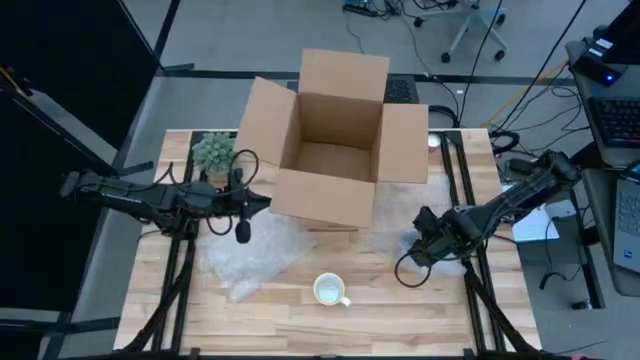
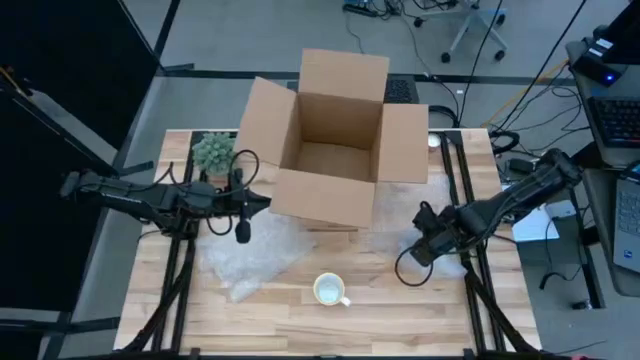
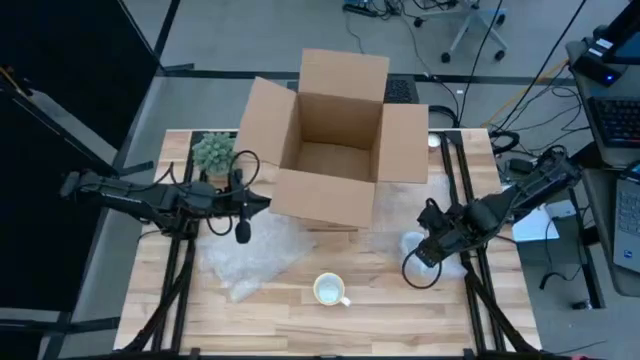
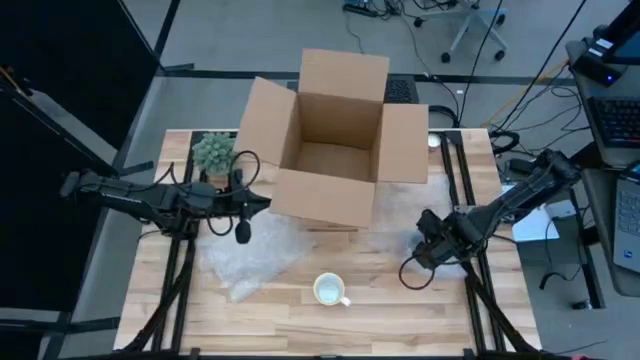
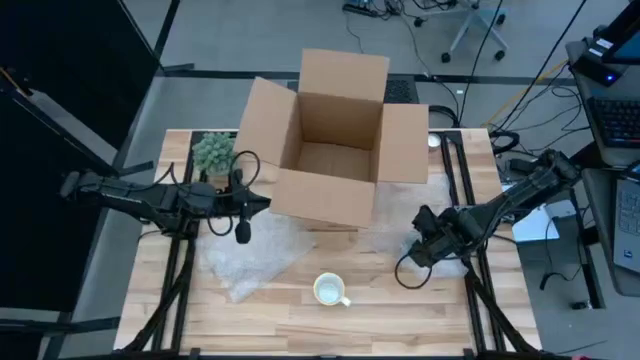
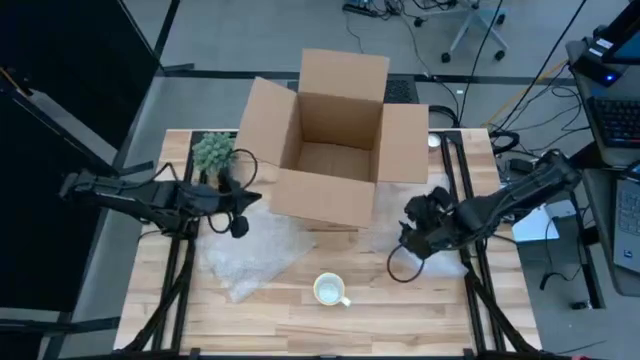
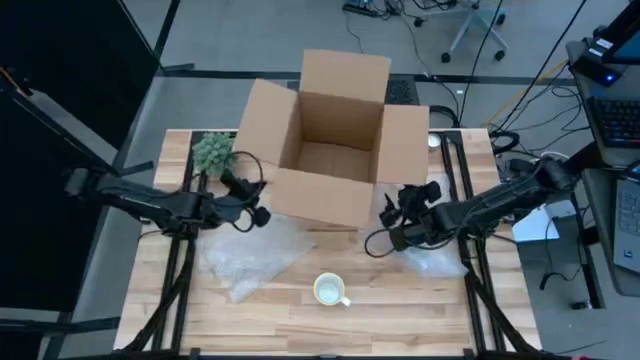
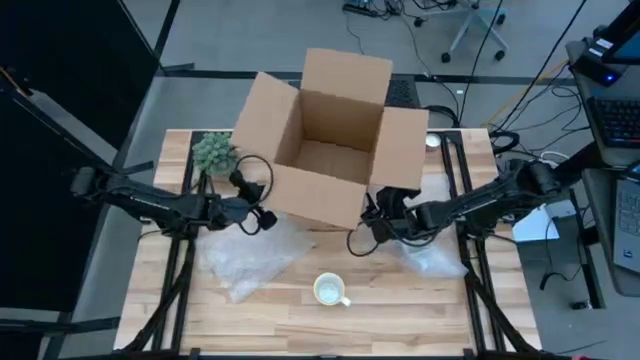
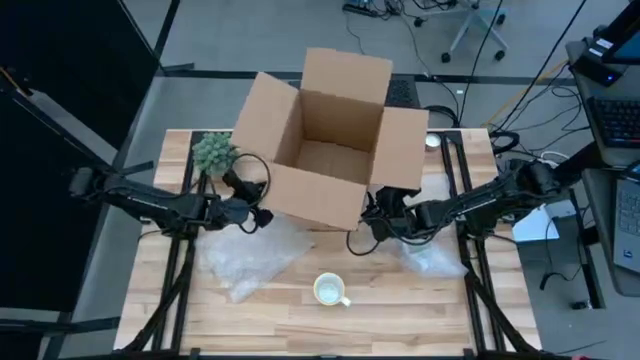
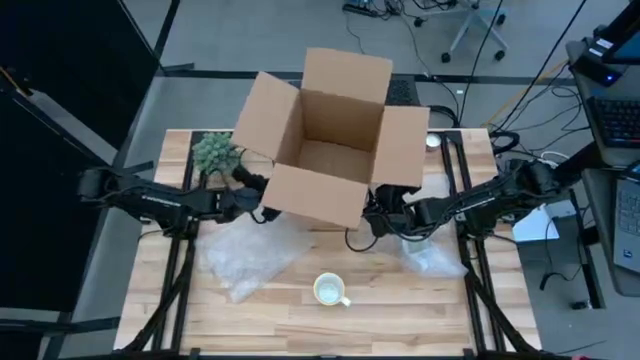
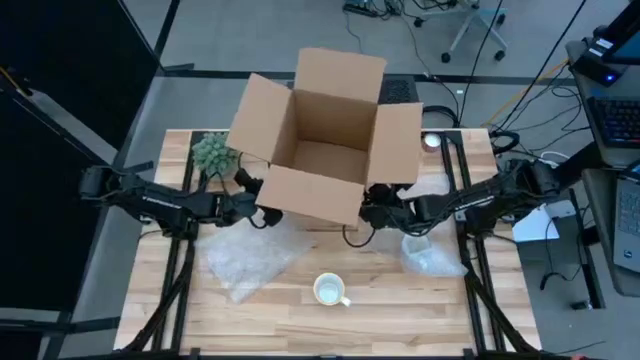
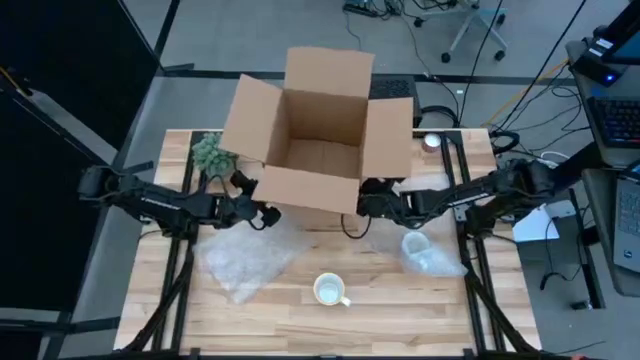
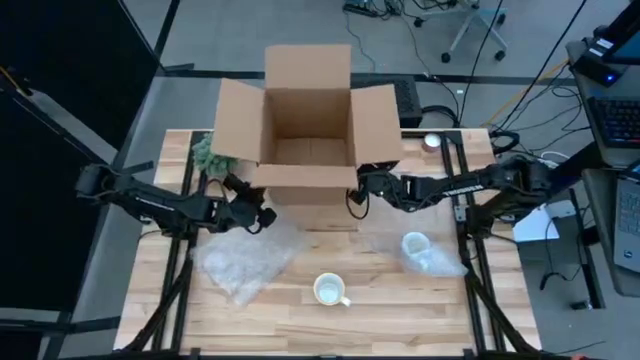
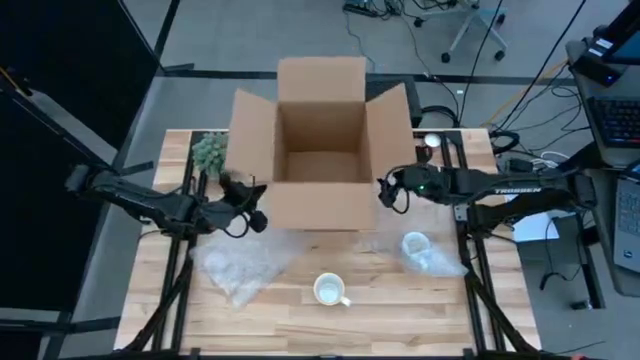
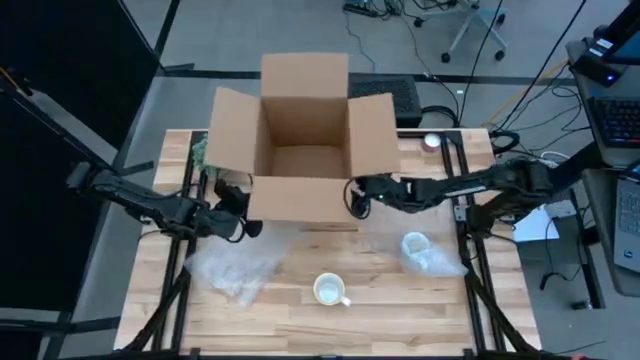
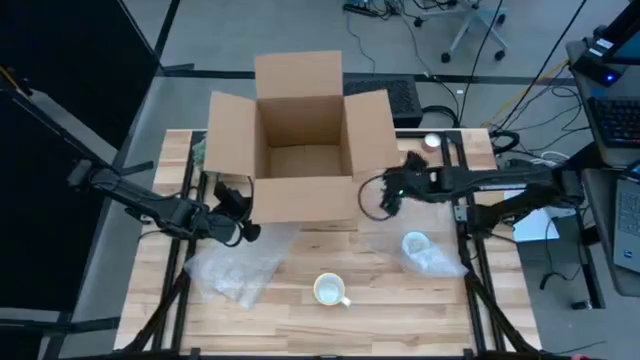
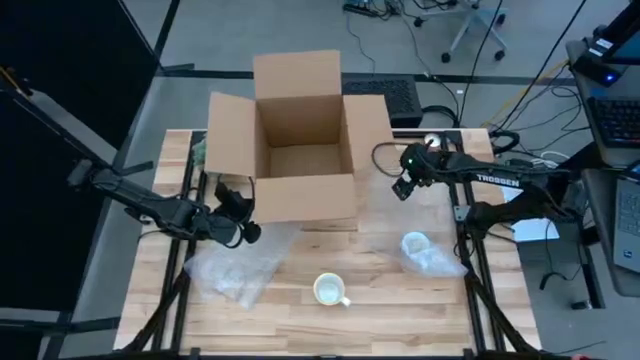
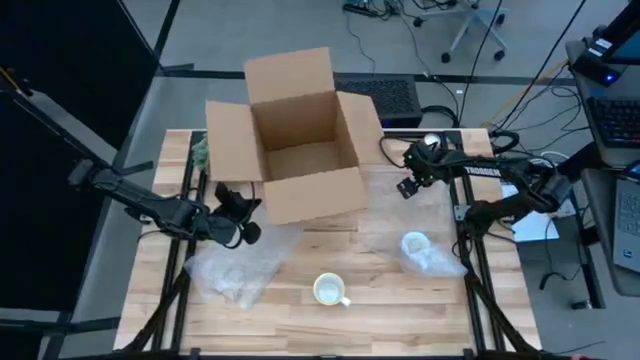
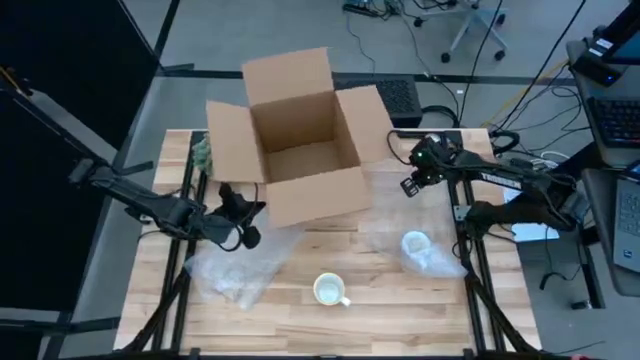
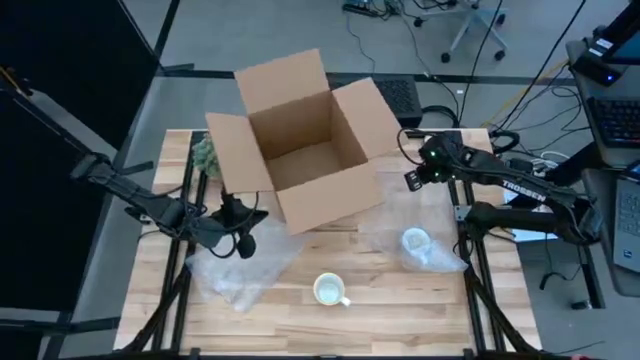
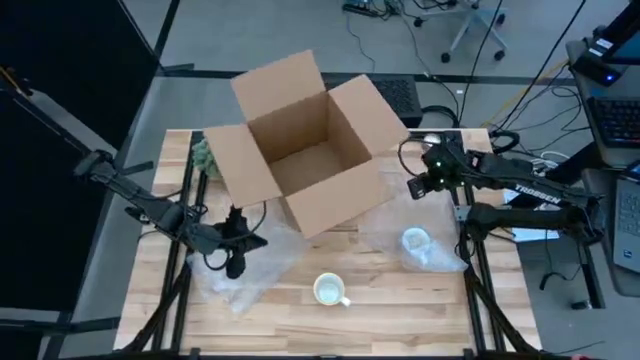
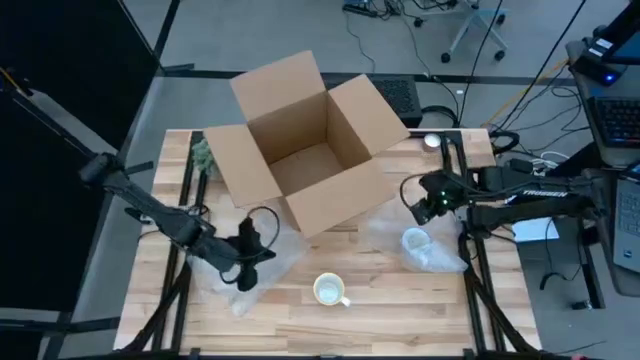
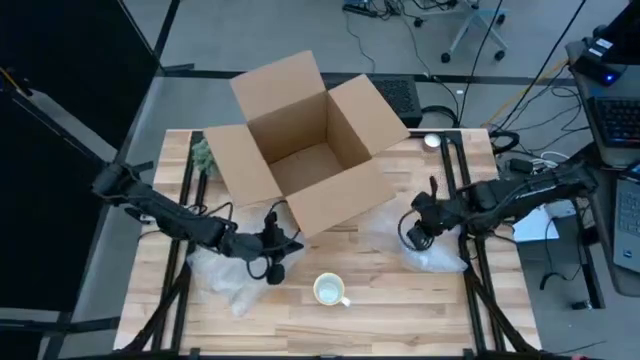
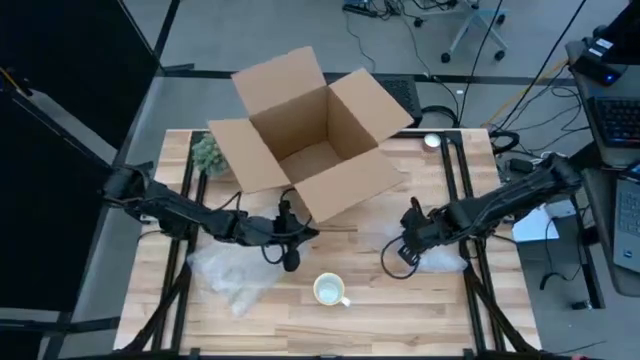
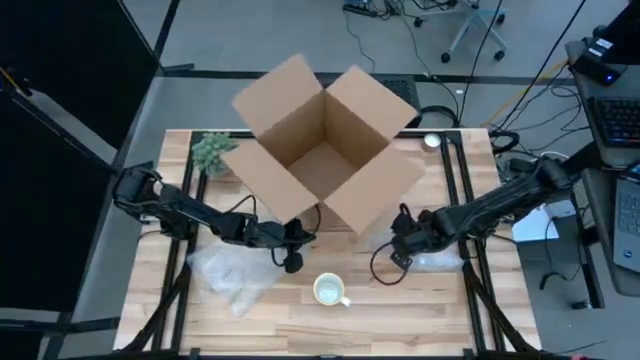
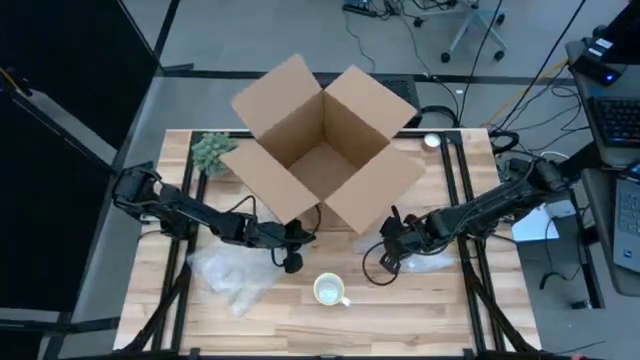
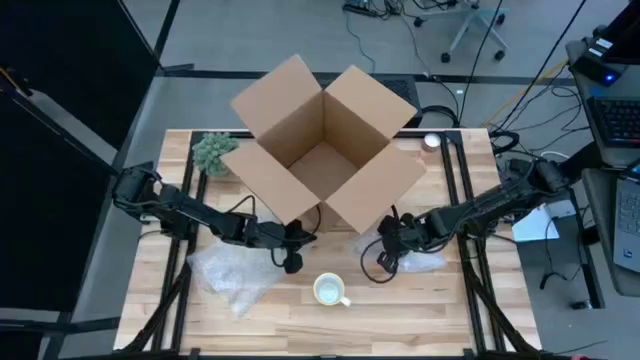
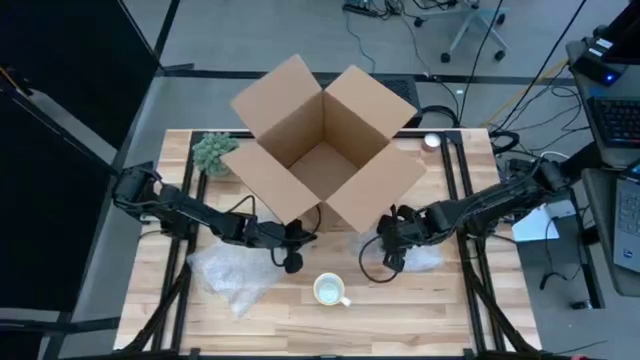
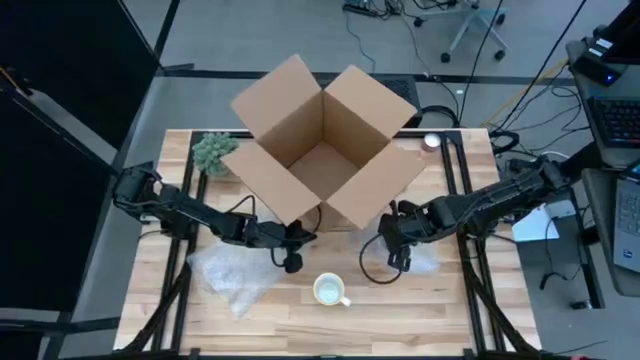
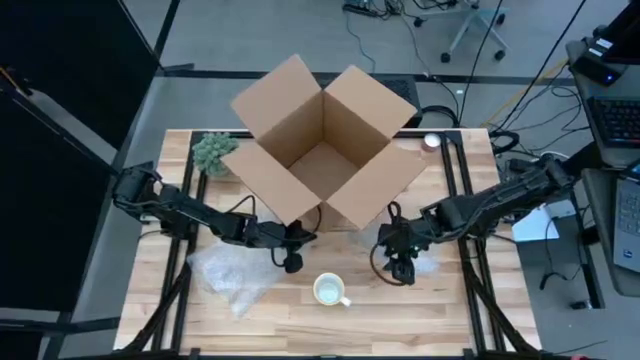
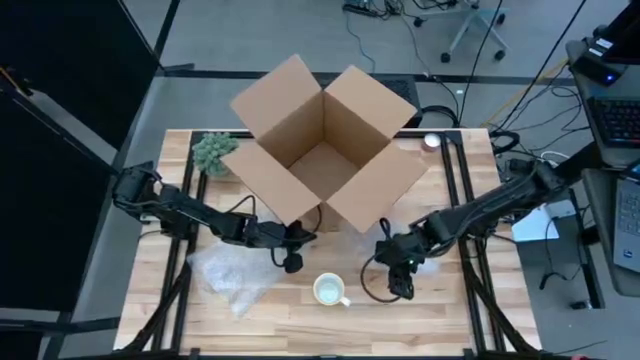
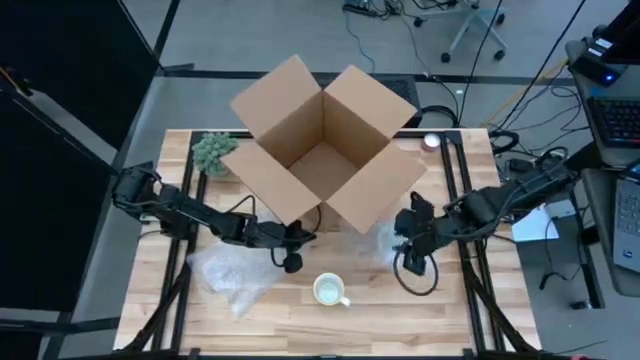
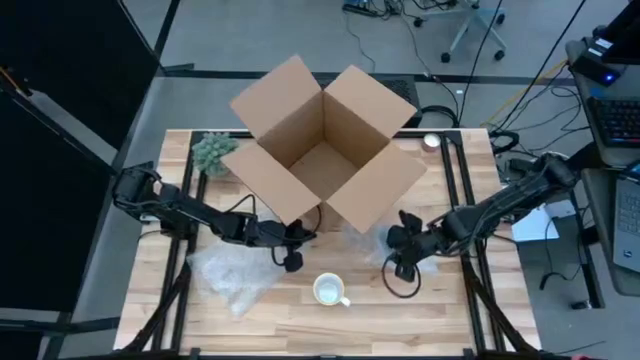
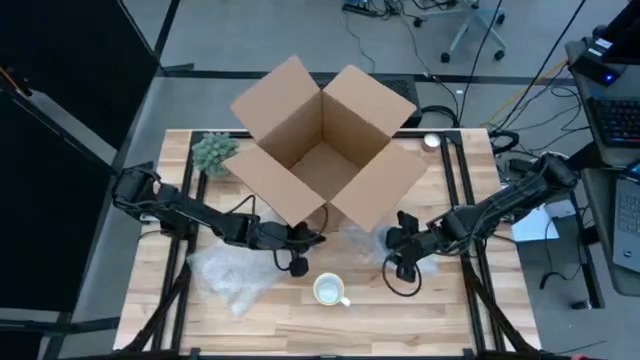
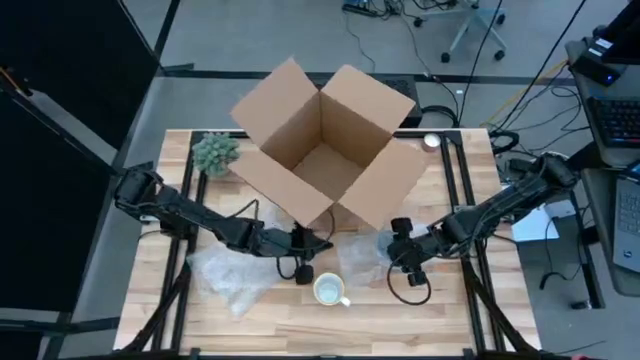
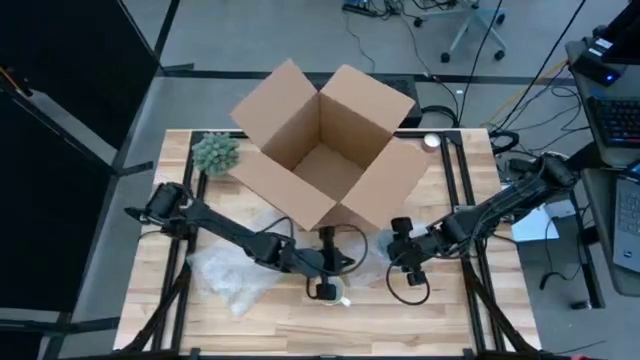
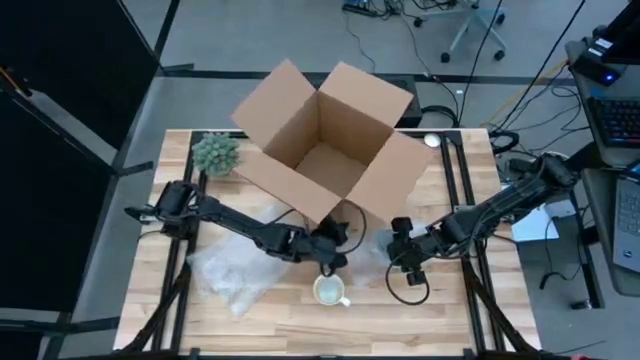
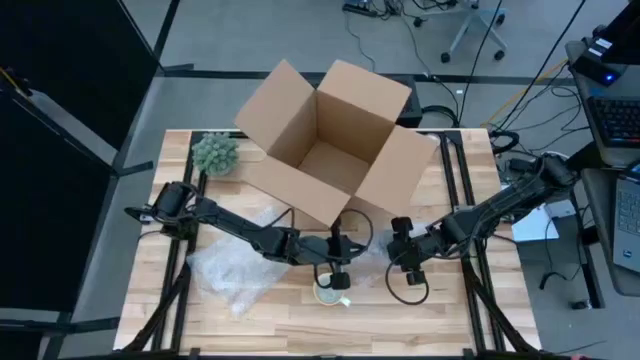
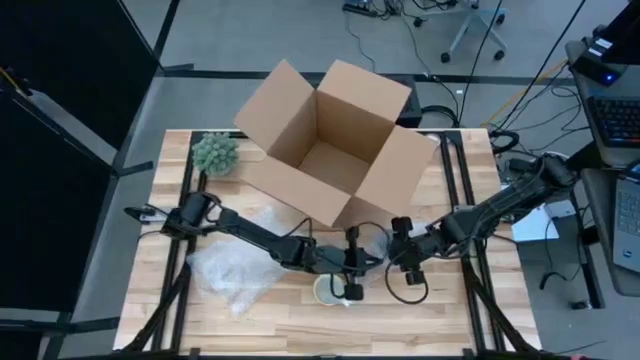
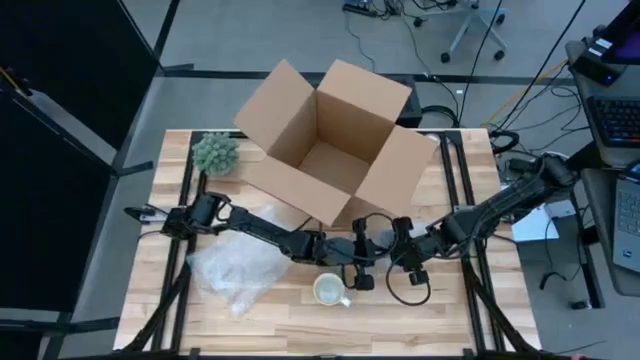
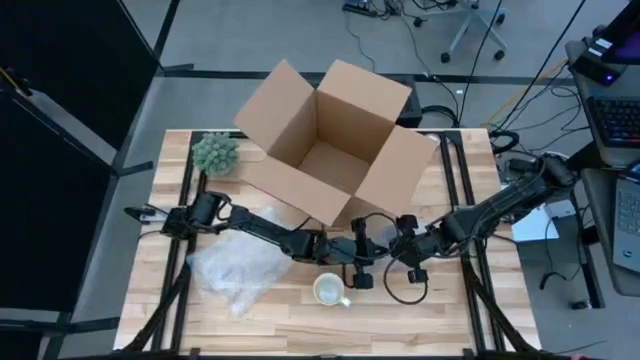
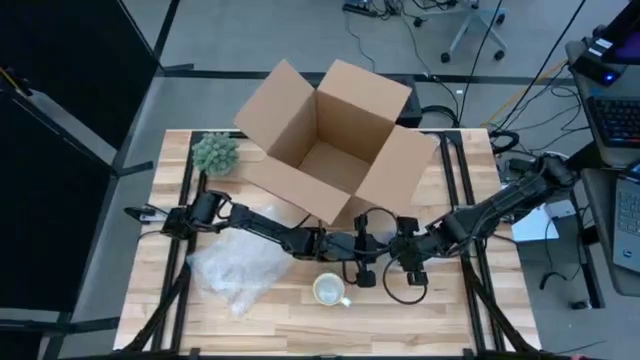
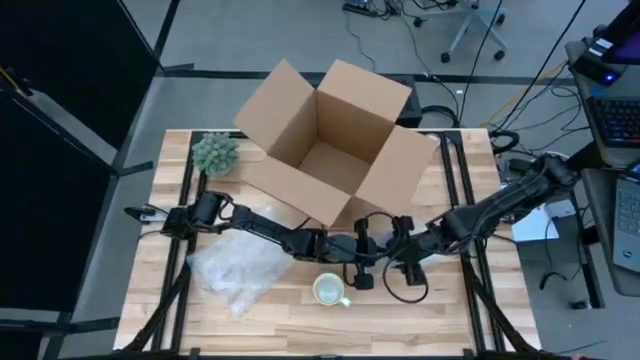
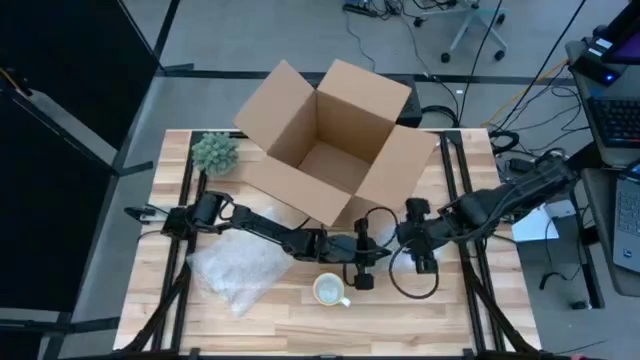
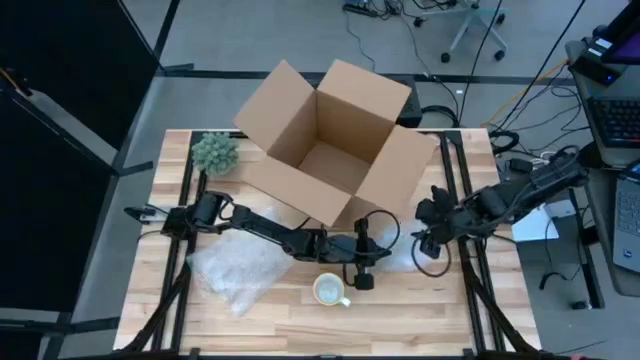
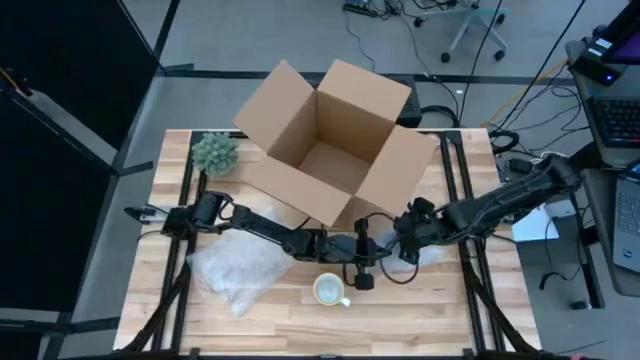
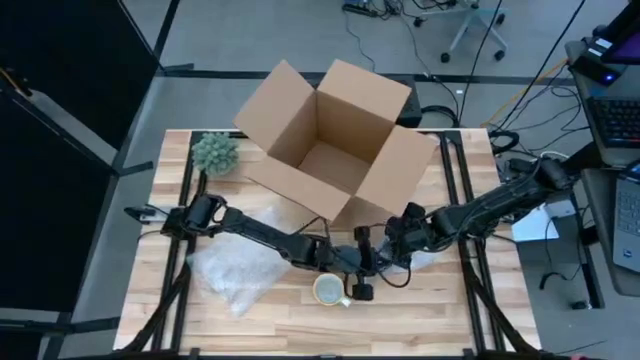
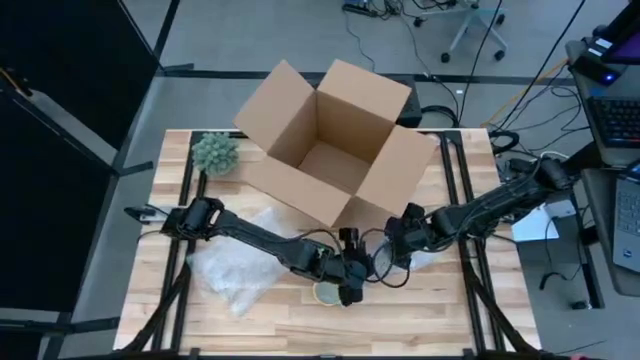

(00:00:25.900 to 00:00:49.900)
Task: wrap mug
Wrap the red mug with bubble wrap
